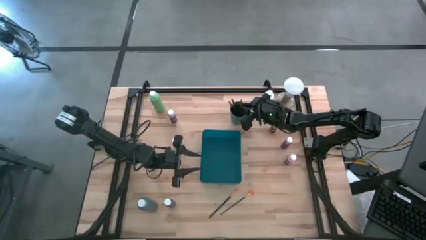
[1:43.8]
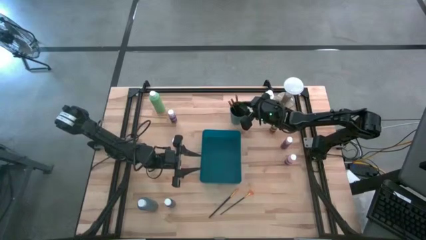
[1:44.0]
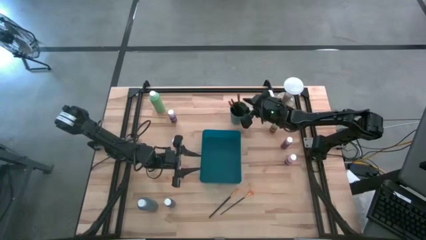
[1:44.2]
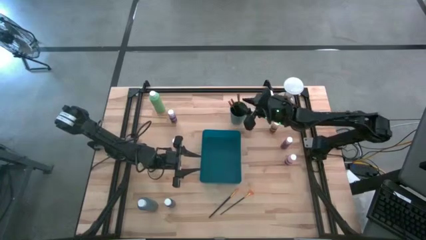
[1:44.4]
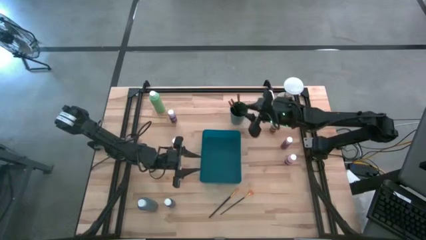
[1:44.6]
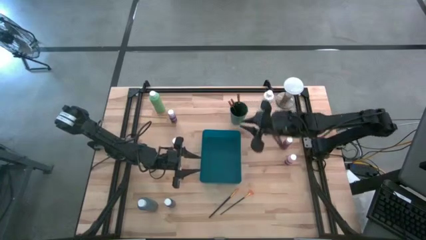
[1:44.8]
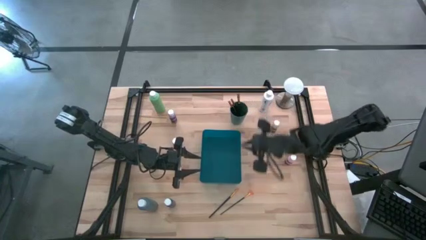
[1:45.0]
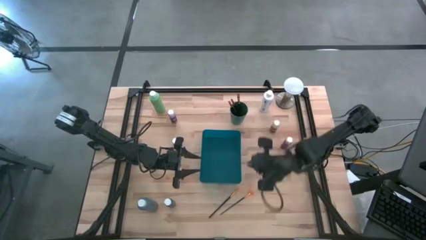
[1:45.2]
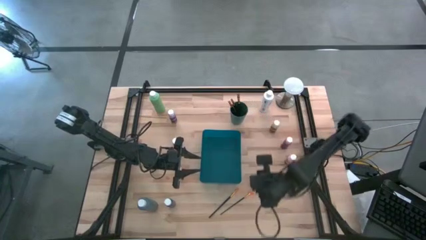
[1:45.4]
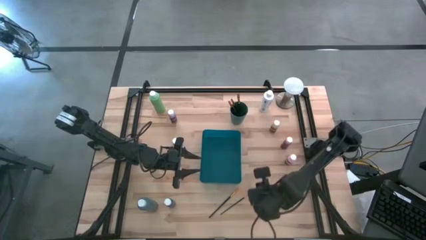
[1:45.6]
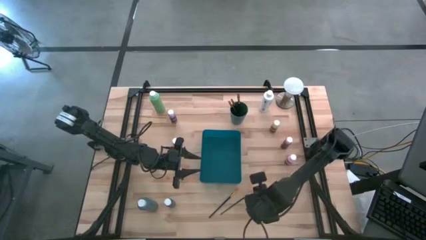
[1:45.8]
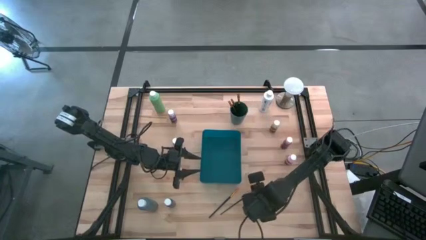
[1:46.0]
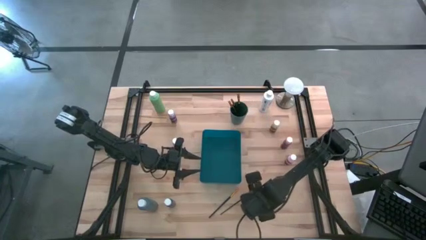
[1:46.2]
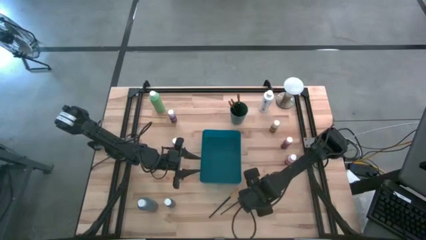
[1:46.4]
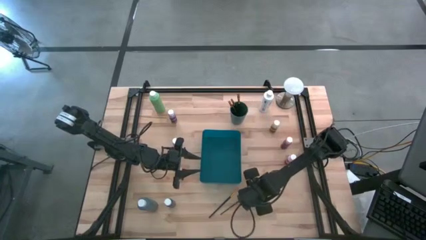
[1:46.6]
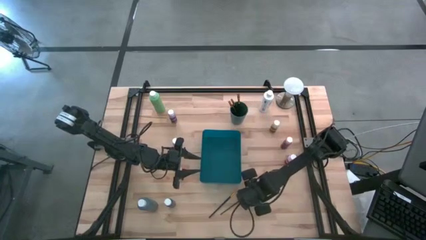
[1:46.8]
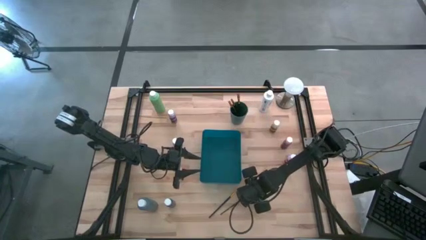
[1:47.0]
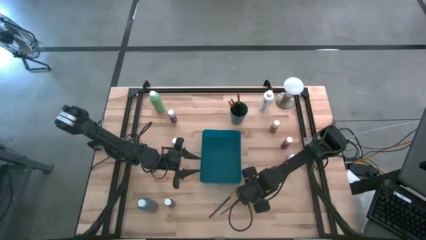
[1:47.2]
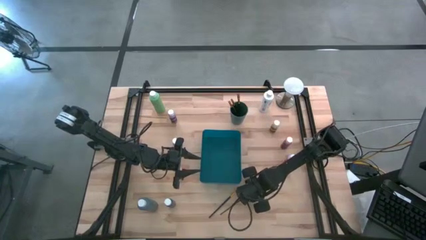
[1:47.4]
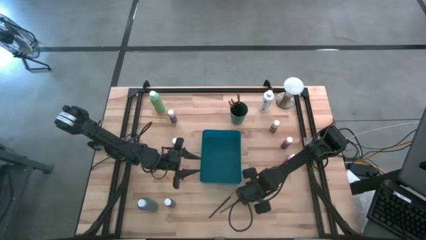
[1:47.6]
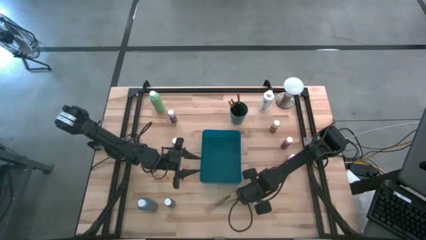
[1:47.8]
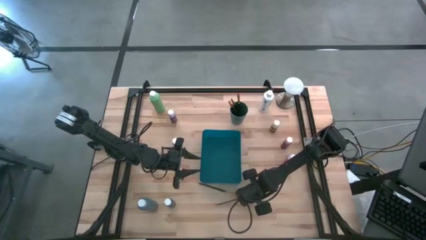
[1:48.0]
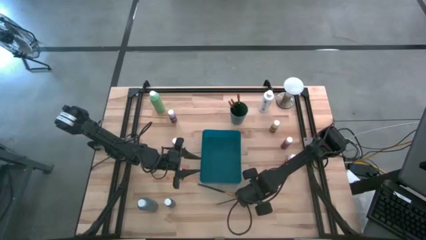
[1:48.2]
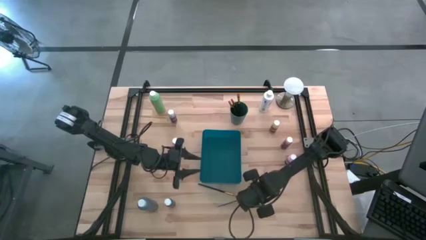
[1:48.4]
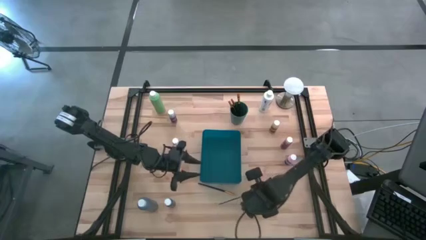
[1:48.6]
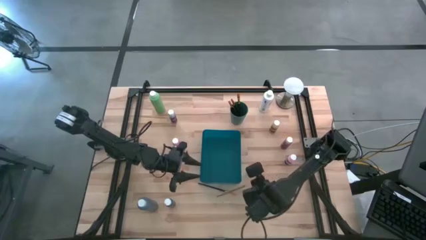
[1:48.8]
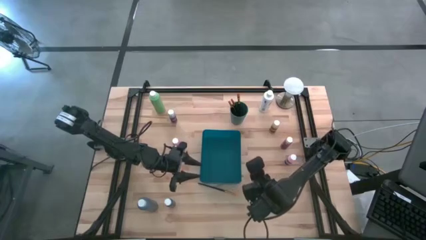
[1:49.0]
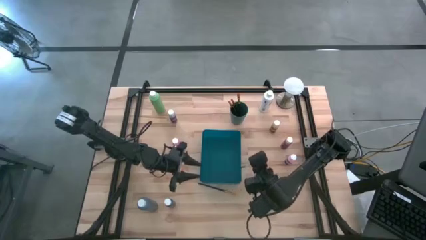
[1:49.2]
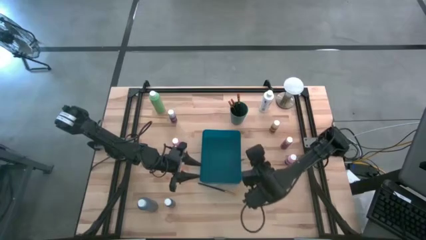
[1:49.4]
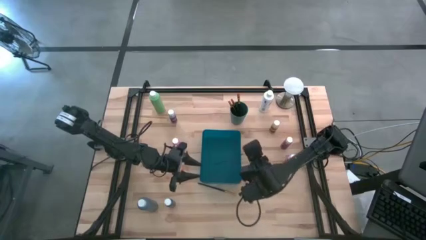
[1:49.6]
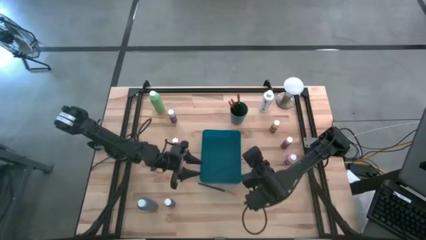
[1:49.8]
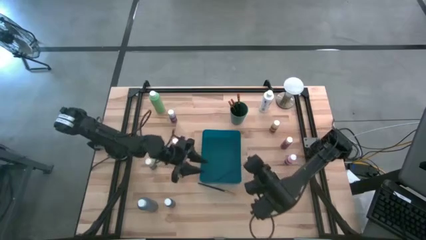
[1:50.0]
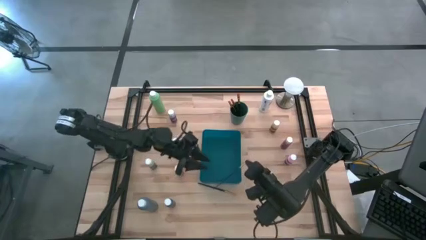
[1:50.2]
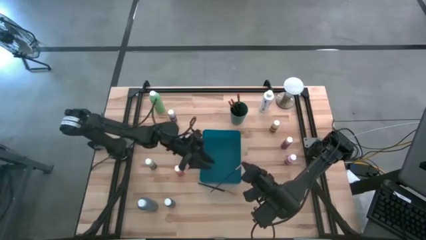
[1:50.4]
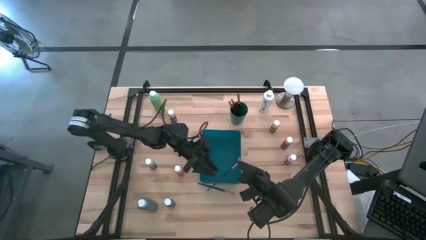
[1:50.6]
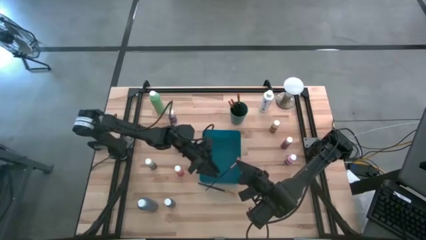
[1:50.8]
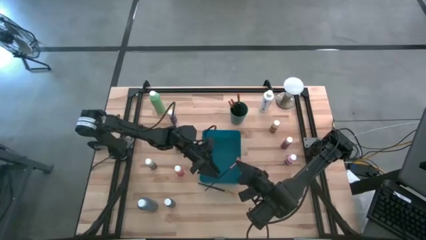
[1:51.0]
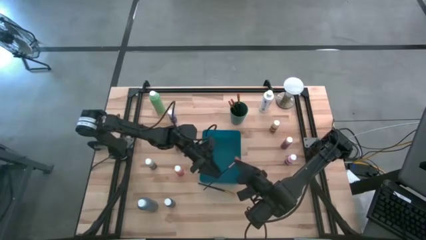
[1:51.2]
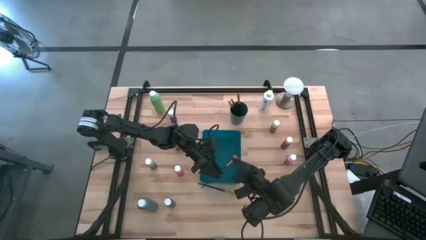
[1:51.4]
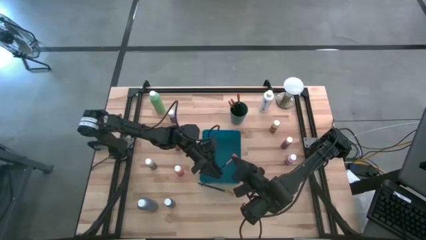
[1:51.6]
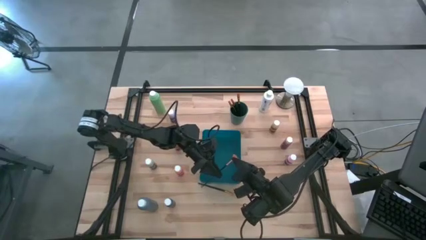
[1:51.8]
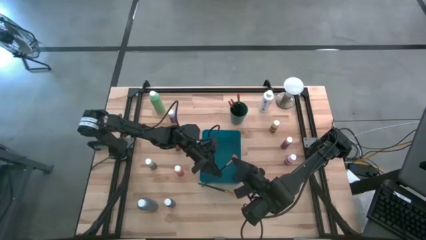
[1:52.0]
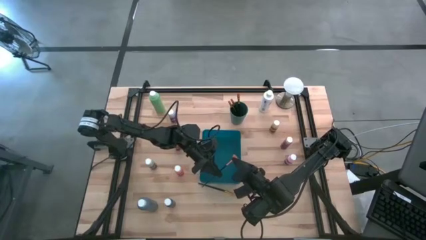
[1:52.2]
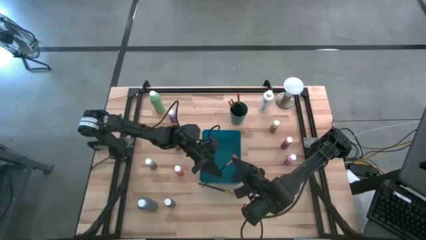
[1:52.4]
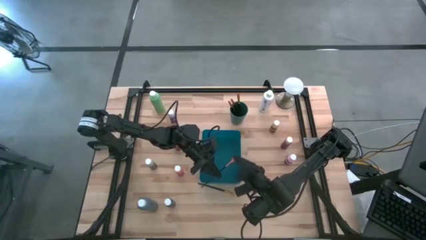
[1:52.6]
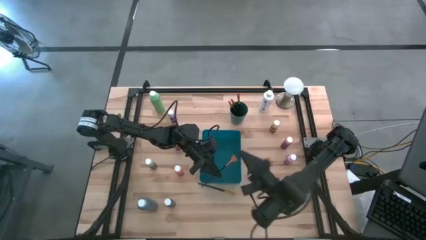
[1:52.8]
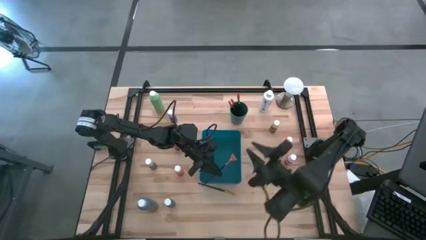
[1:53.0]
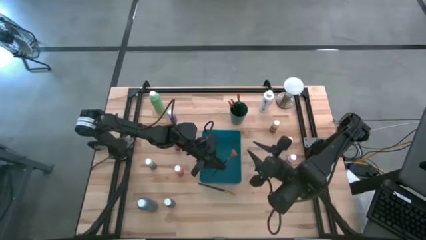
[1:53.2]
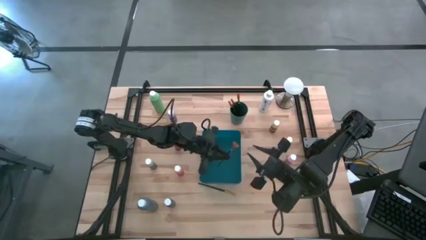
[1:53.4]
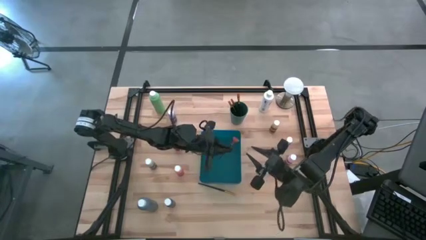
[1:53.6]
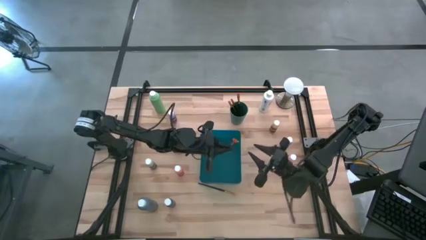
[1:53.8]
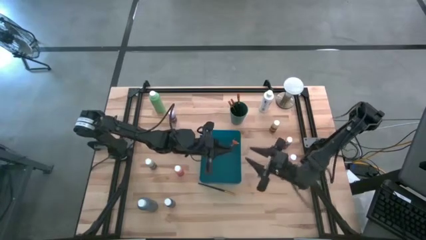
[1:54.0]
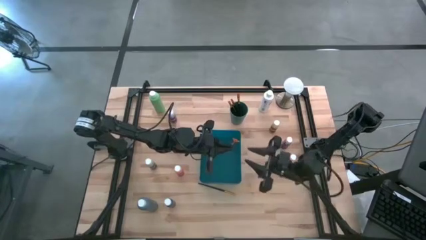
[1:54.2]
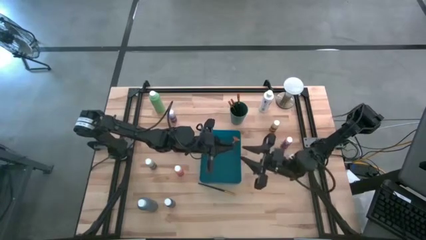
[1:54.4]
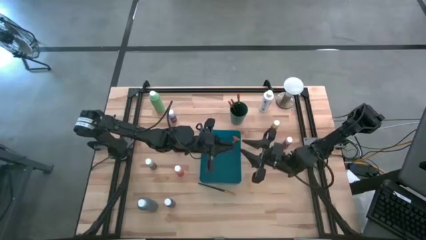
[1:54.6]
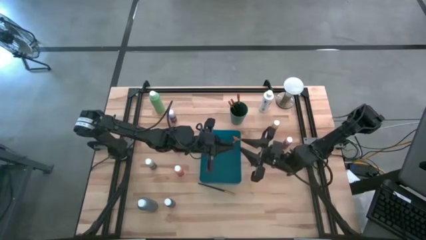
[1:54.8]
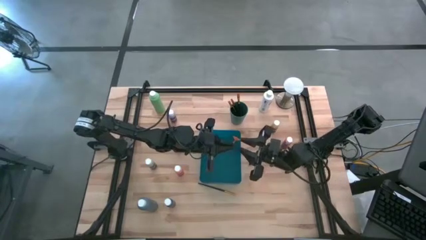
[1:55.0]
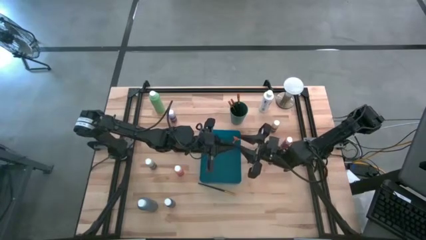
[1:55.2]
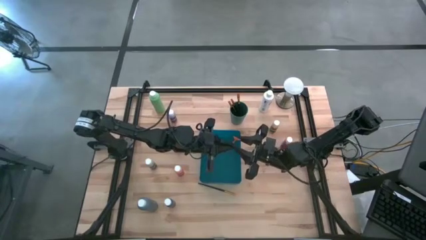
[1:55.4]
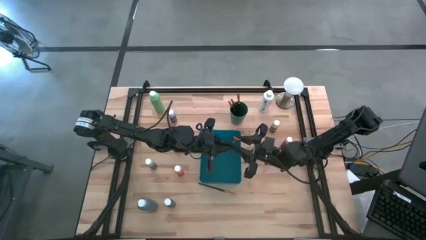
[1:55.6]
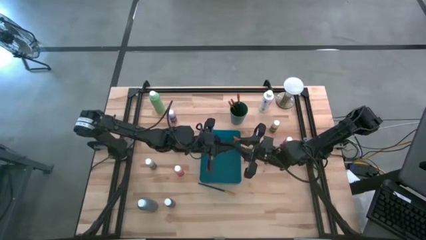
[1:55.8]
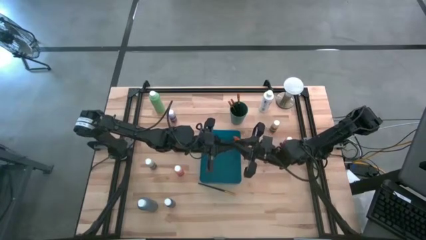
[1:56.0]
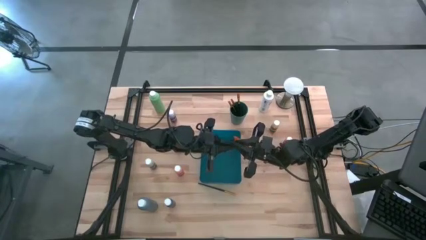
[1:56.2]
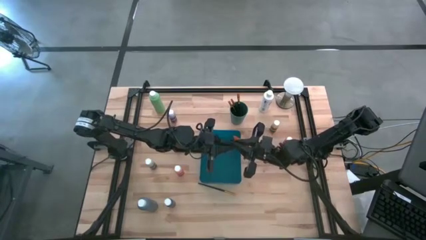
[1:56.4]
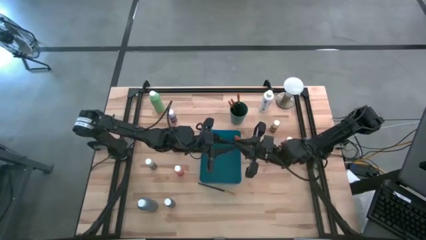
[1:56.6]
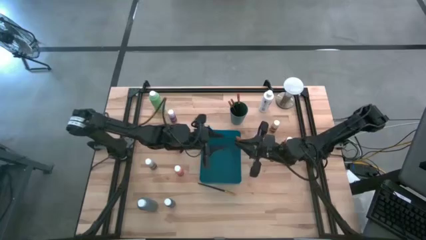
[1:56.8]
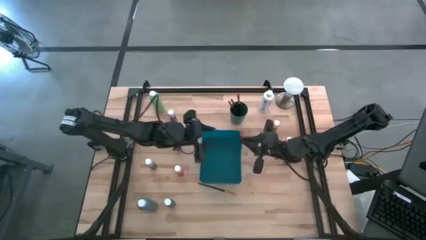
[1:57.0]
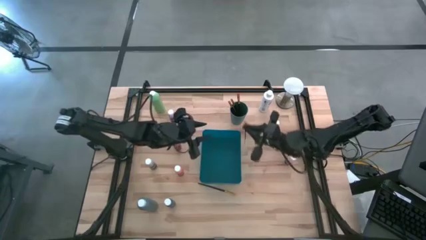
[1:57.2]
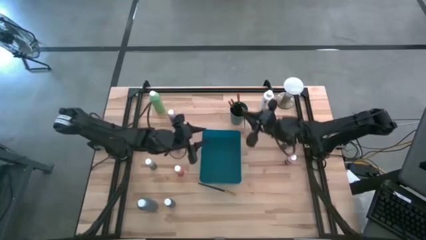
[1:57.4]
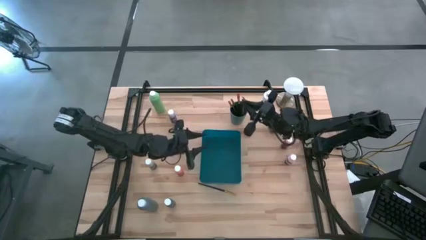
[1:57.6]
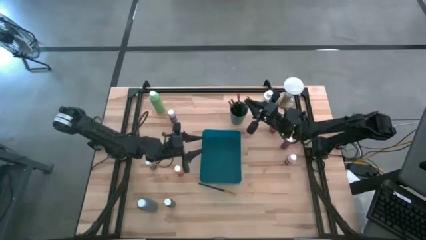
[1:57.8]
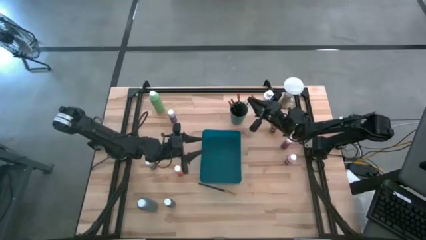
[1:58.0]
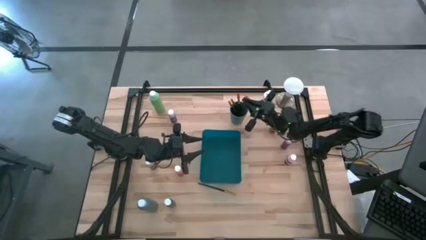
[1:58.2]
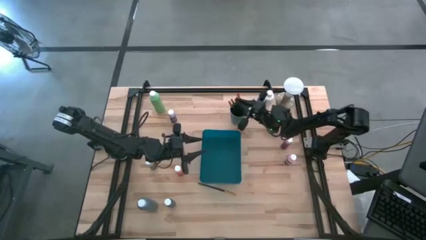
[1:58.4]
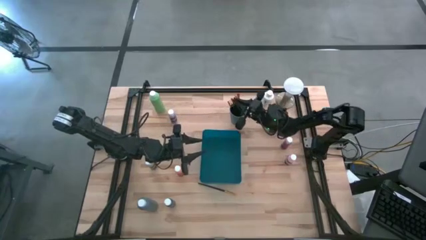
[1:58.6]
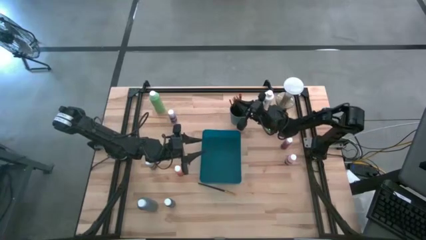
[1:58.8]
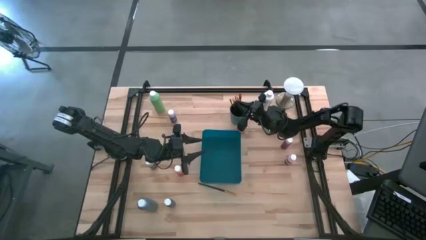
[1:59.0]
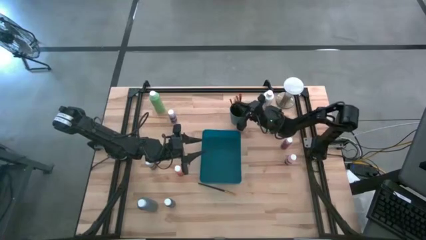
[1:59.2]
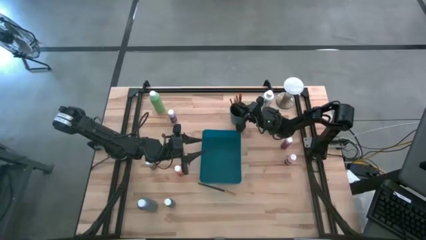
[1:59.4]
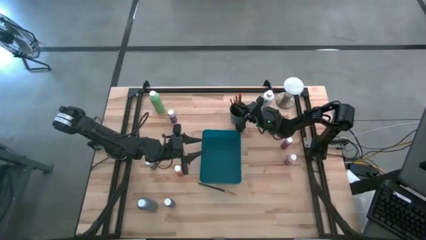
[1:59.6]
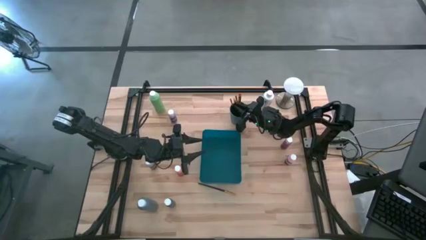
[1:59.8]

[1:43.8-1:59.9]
Task: Pick & Place Paint Supplies
Put the gold paint brush into the green cup

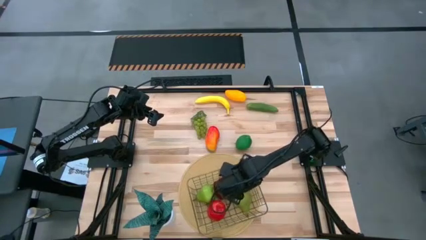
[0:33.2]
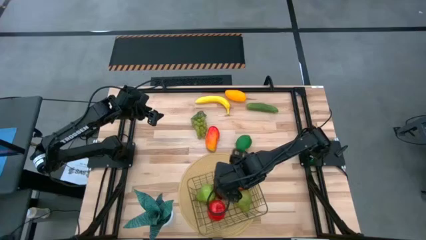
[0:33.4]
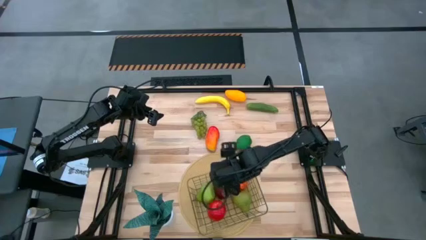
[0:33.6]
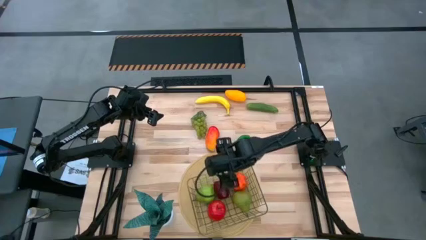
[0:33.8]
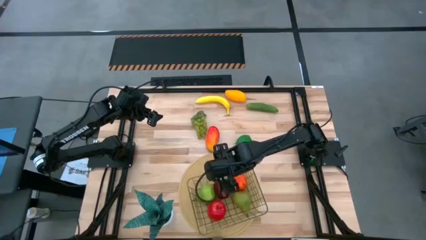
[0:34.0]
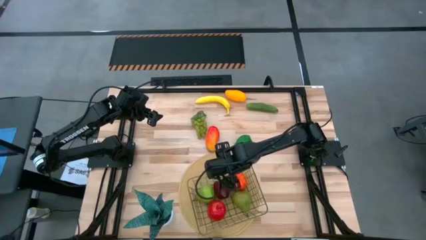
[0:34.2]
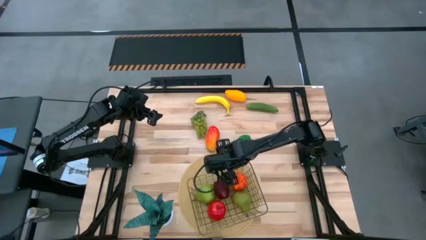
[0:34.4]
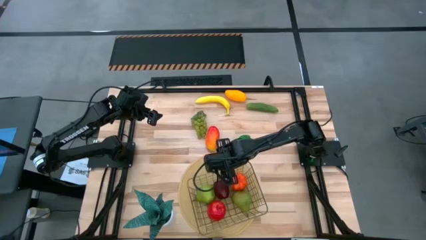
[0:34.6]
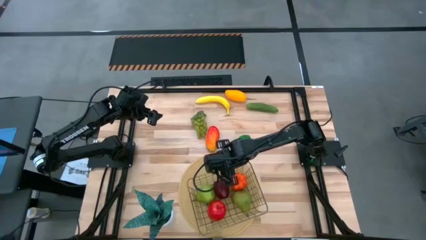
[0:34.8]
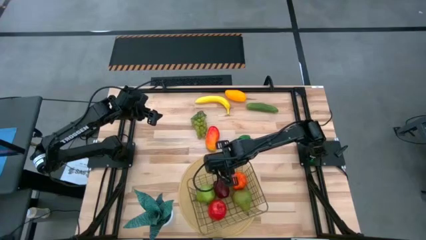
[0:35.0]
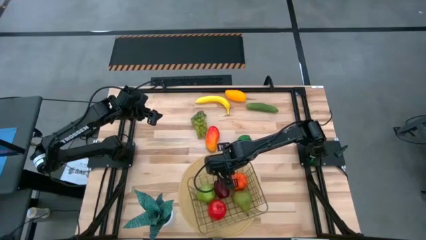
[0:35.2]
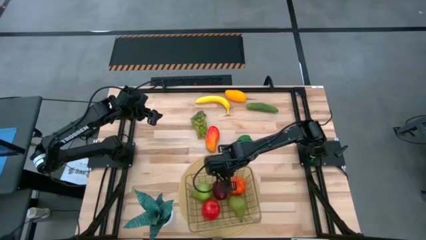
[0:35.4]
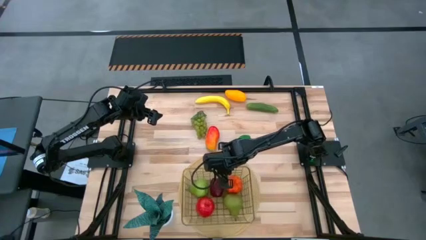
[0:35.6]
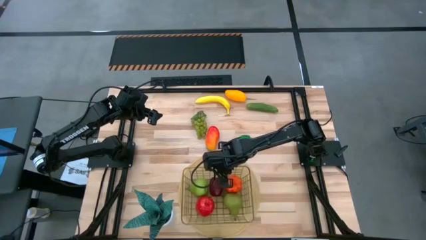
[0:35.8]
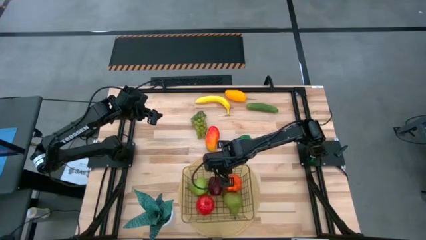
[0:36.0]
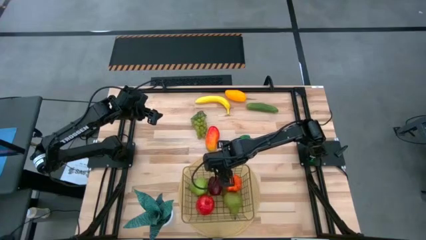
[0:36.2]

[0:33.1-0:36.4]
Task: Build produce basket
Adjust the wire basket
